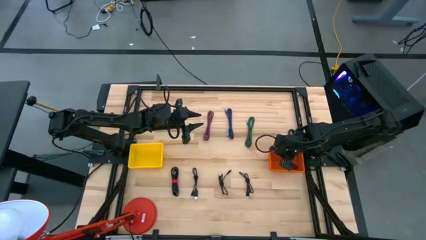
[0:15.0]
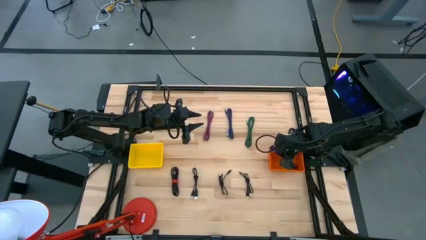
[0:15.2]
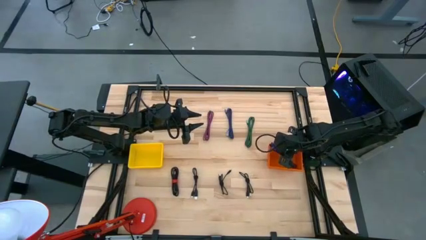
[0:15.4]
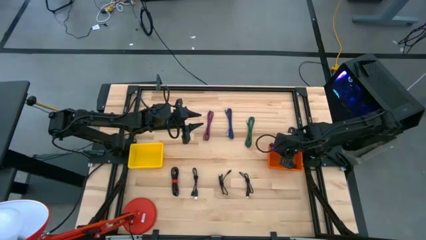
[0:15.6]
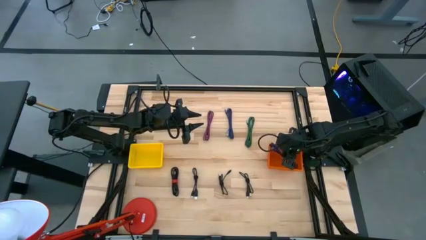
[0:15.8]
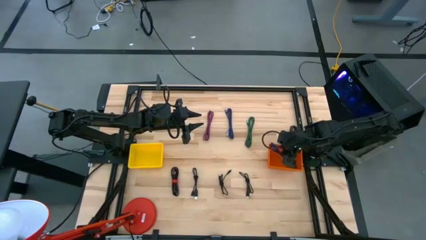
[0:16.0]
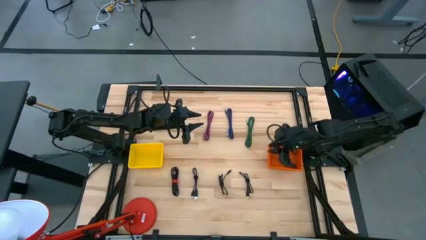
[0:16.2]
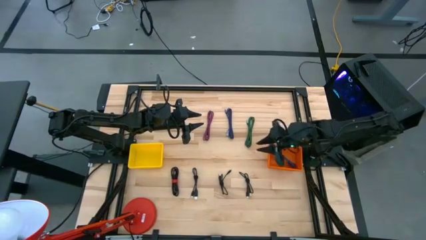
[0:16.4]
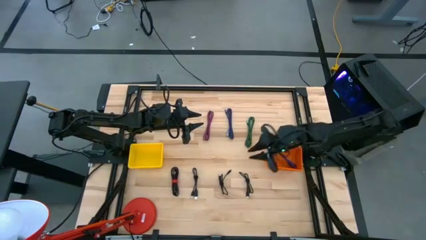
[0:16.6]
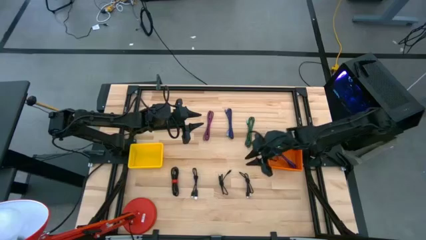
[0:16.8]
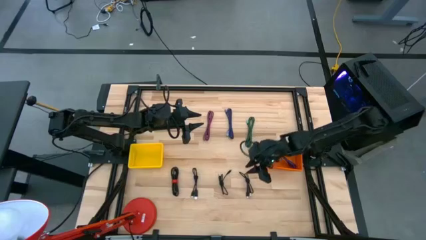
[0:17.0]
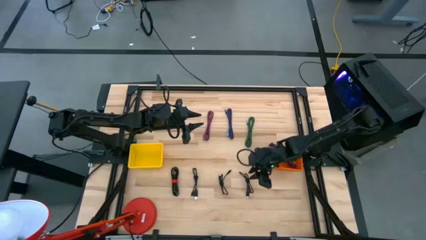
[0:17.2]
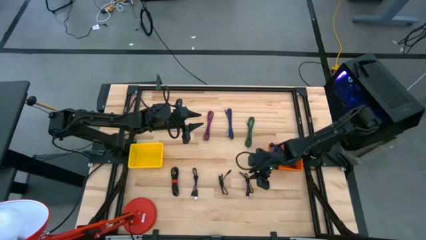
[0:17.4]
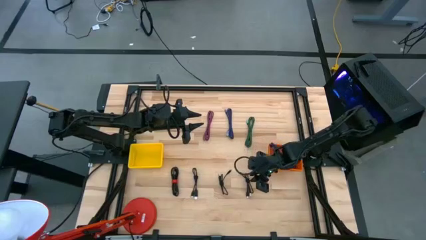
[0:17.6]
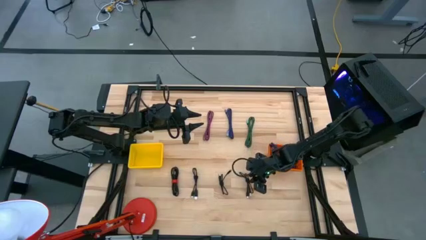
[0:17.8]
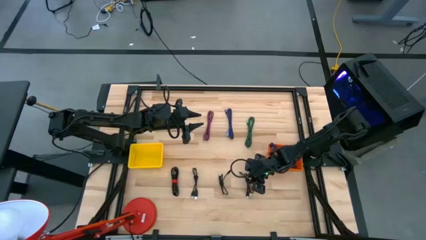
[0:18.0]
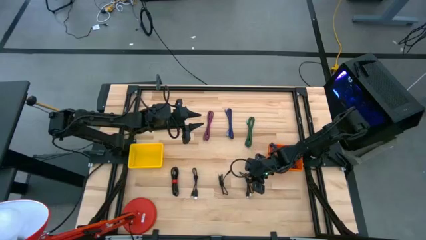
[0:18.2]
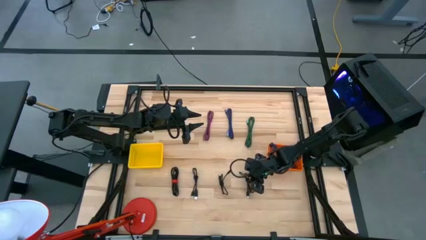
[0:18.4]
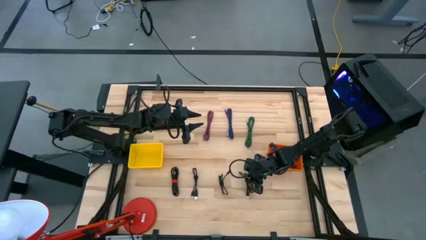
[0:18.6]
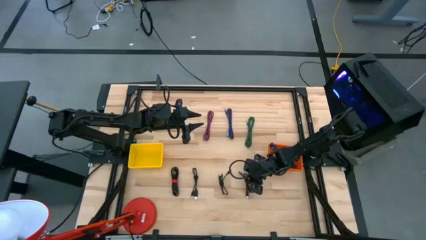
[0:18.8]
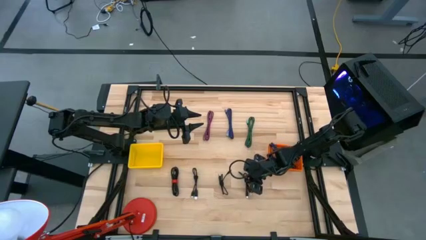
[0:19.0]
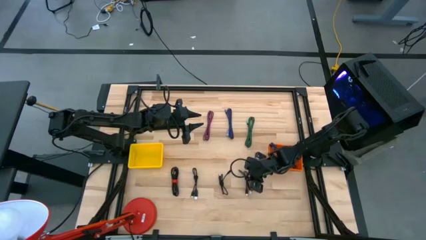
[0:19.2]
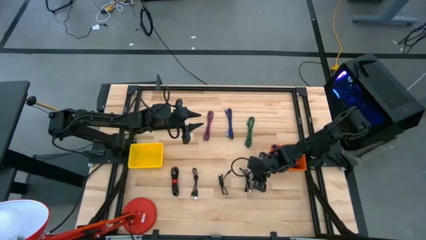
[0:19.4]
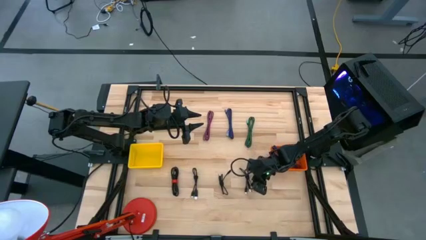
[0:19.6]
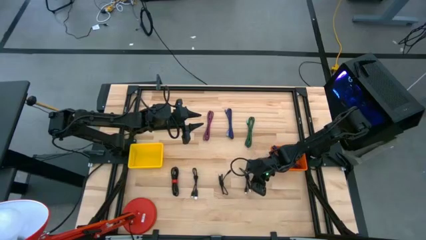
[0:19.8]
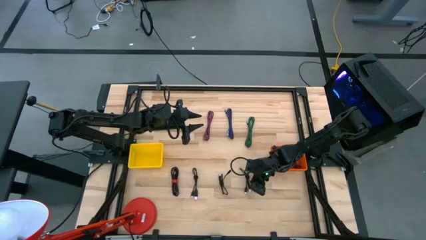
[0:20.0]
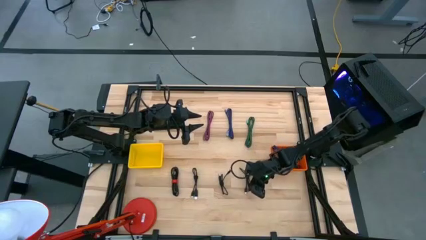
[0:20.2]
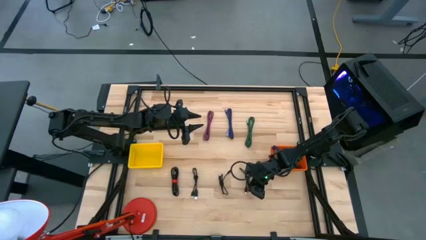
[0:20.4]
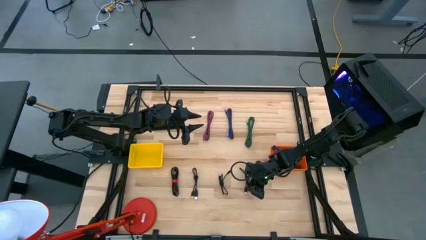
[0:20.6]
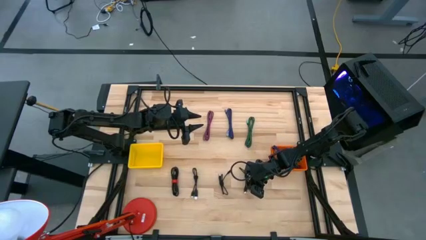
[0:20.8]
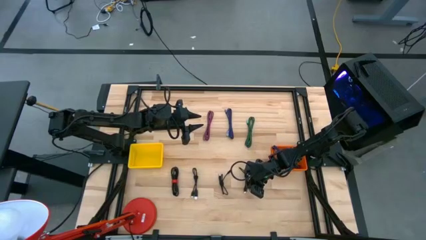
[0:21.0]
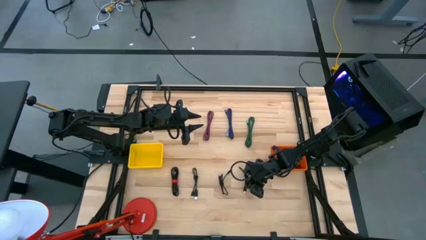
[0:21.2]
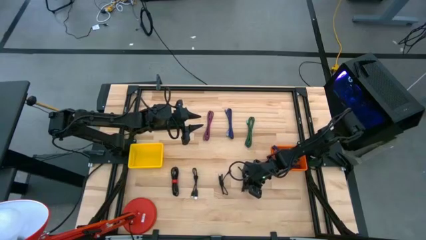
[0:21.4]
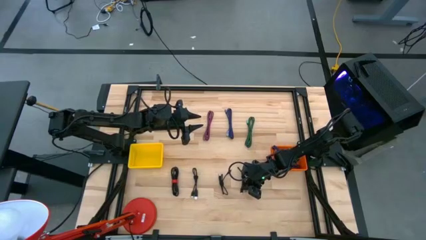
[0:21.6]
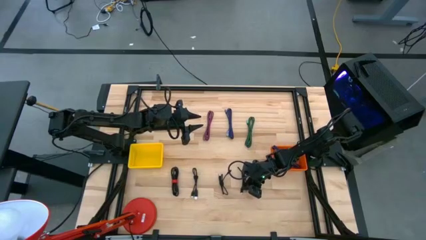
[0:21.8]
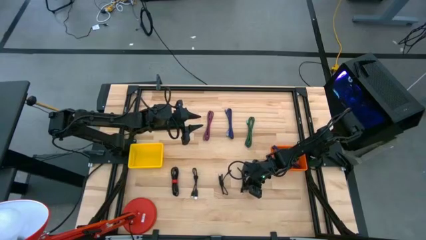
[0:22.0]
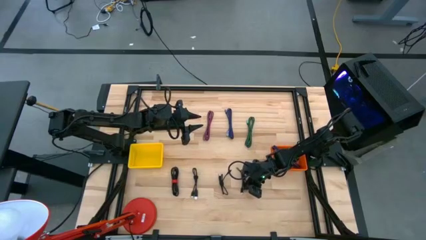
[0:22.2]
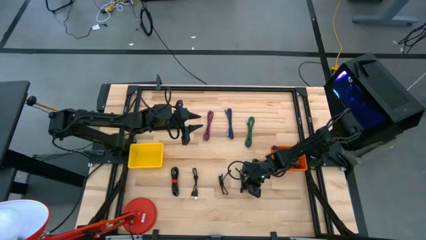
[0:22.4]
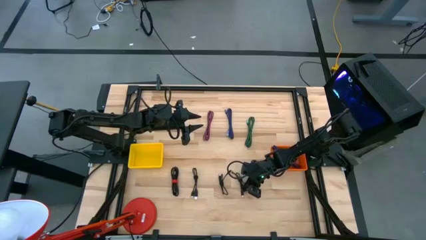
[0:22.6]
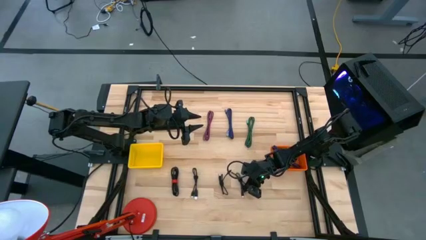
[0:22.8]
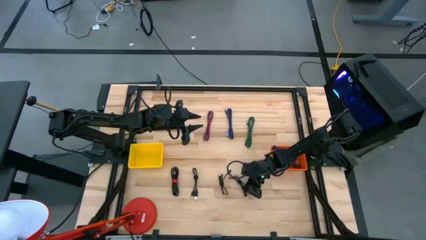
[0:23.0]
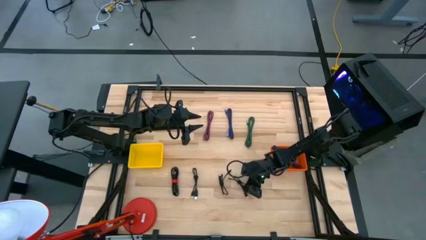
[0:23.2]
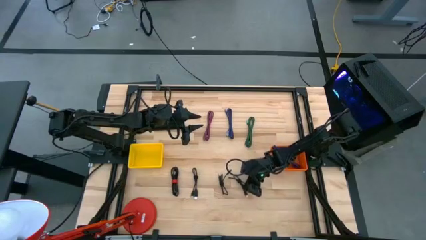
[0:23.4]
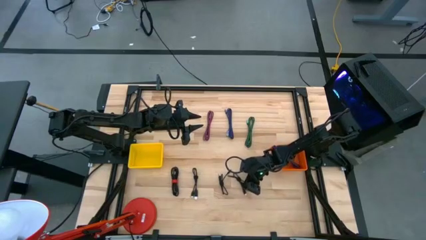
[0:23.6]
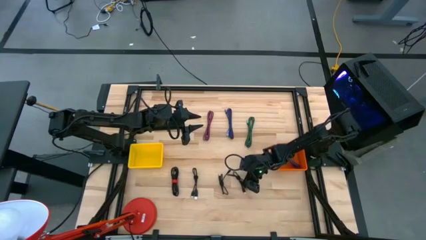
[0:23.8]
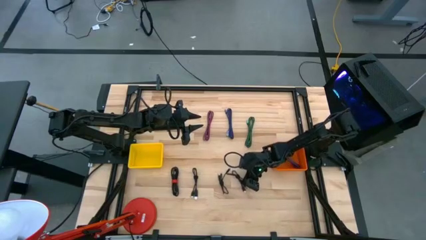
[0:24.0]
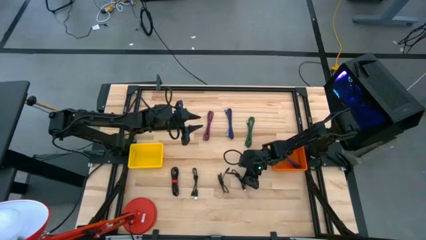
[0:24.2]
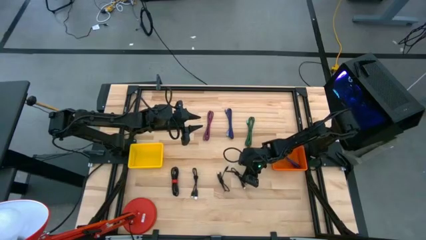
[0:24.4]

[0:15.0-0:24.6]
Task: Pick & Place USB Port
Put the black USB cable into the yellow bin

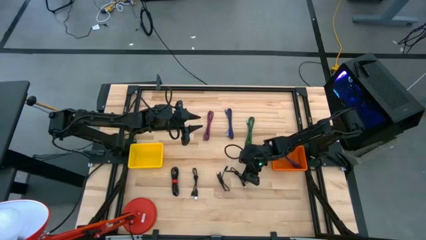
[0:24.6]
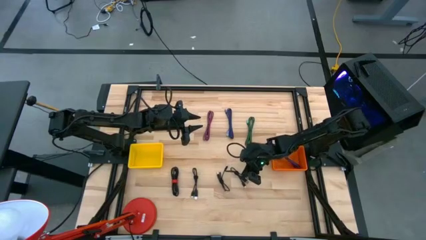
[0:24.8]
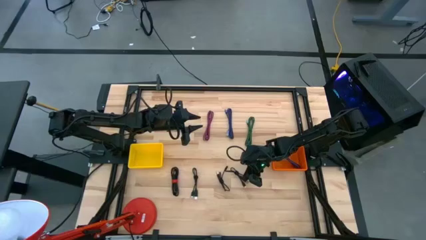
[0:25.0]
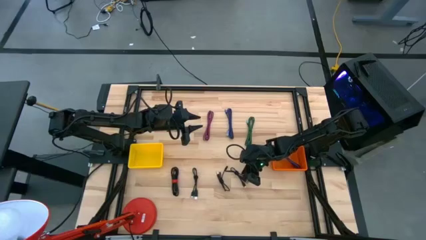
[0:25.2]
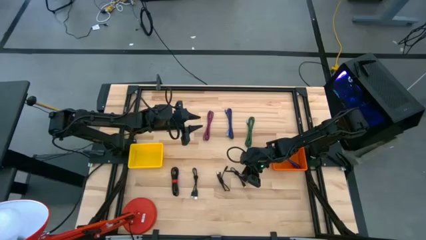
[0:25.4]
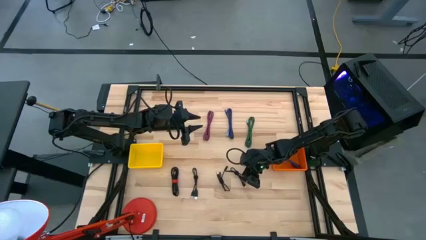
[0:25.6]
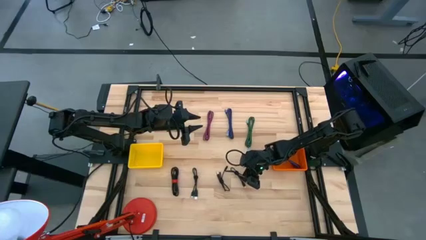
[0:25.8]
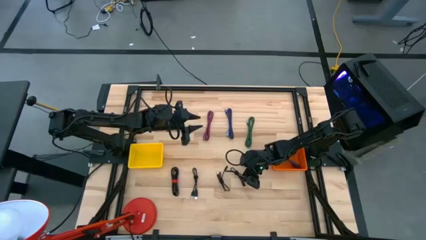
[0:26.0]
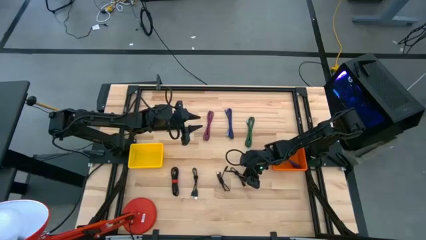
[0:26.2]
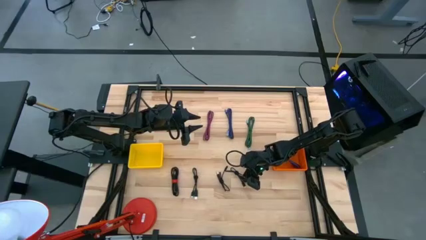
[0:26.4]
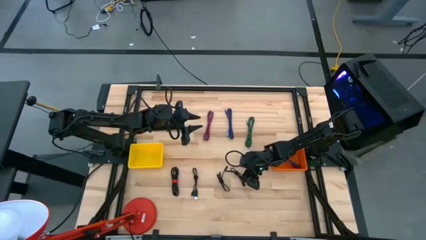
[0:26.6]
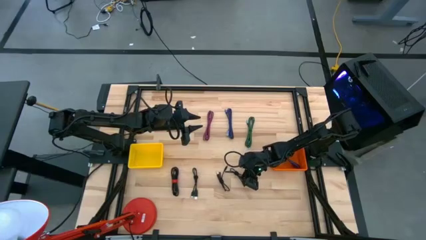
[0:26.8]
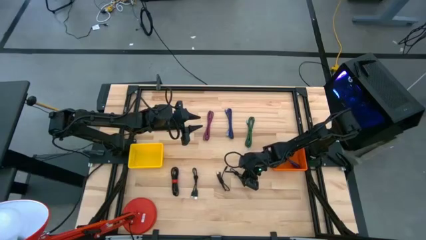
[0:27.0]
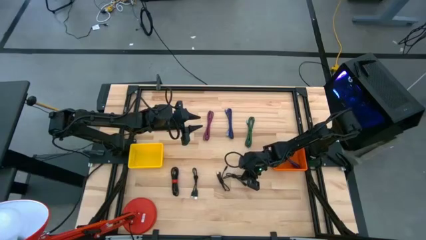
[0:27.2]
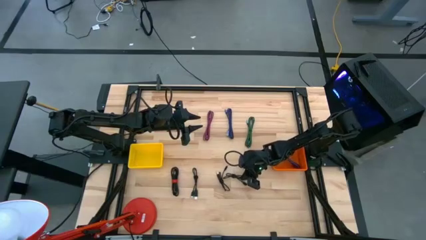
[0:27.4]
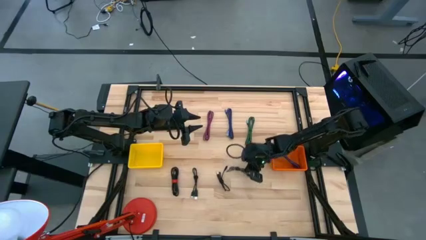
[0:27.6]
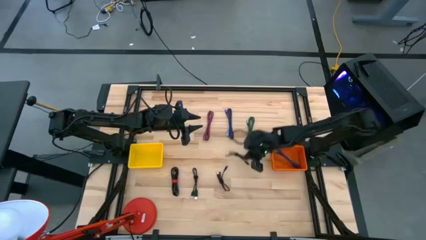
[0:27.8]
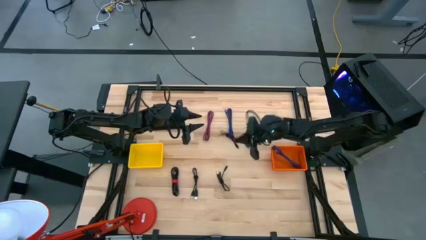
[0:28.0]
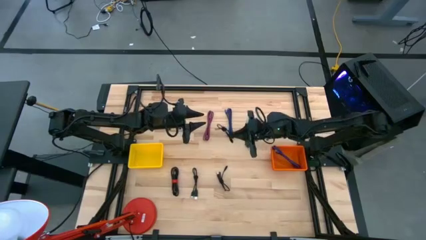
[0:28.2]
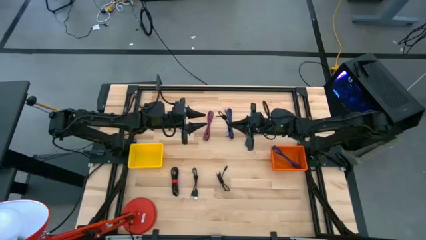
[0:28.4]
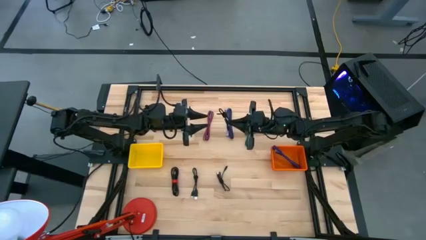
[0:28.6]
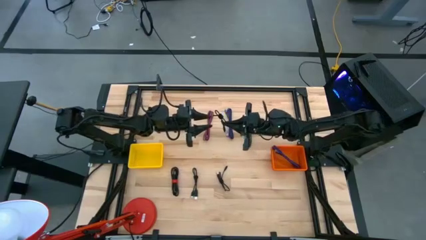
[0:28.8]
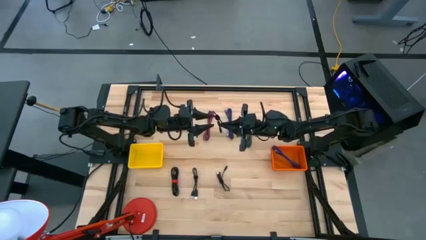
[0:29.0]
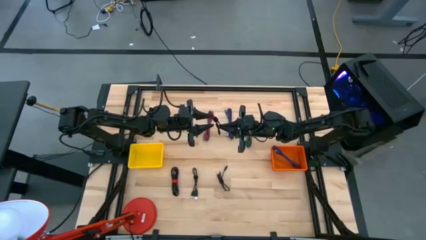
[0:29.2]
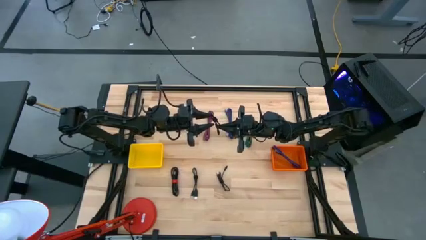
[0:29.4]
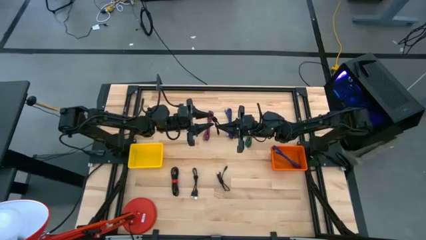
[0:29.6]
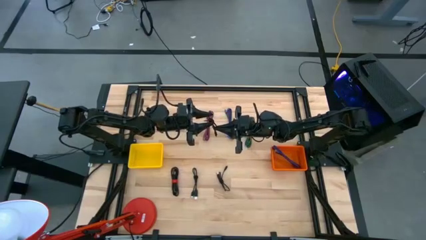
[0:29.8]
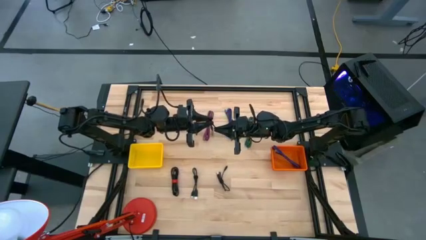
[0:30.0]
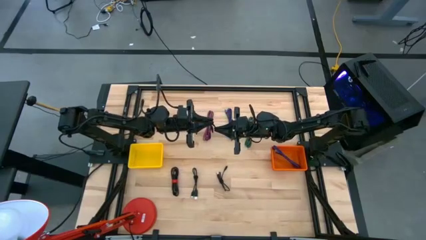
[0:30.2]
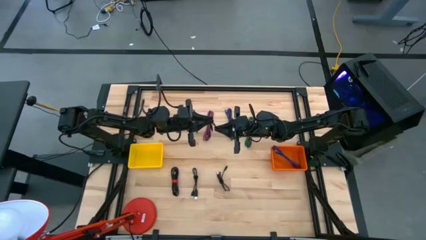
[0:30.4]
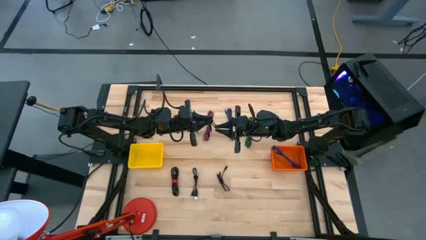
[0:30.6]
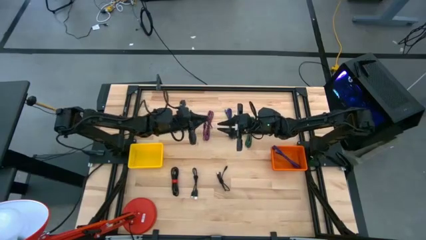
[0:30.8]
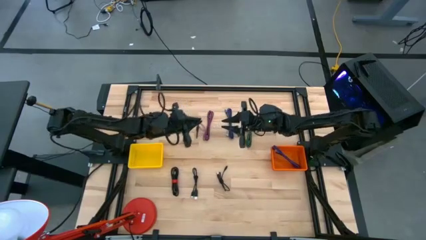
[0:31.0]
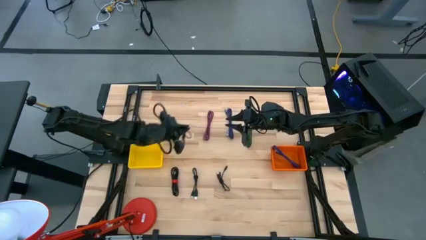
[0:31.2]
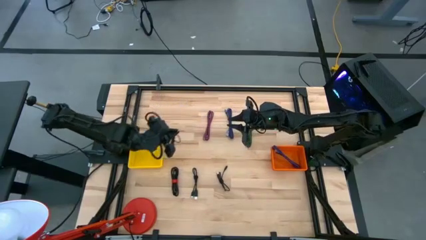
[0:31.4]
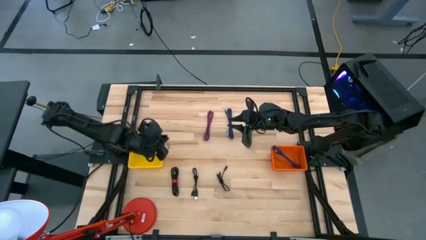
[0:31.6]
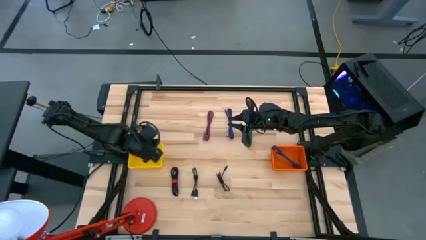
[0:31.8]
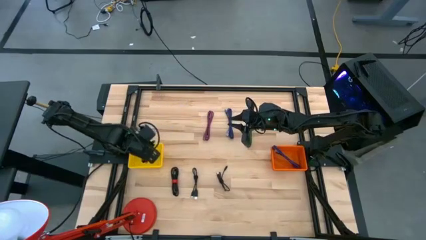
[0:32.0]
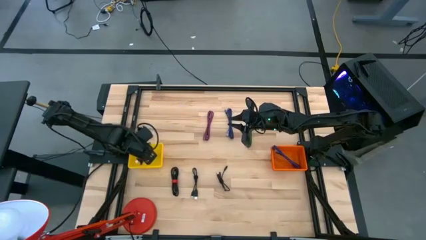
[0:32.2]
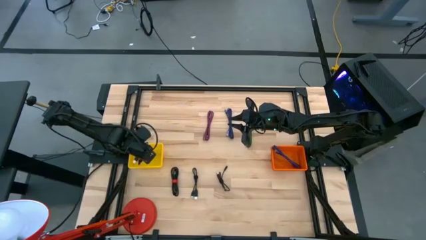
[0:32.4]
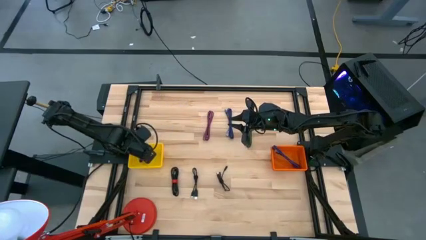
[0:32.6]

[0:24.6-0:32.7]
Put the black USB cable into the yellow bin
